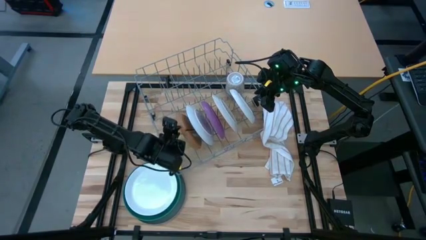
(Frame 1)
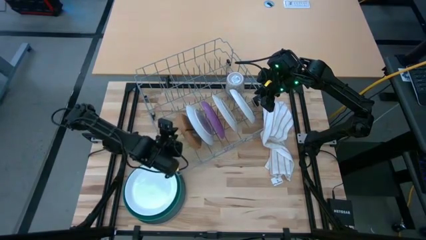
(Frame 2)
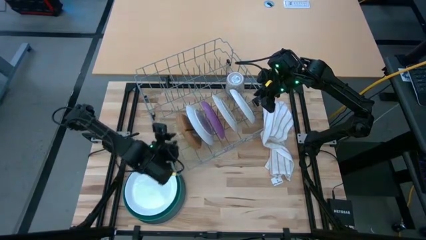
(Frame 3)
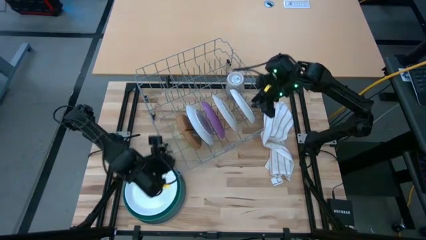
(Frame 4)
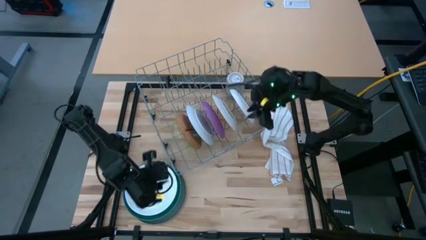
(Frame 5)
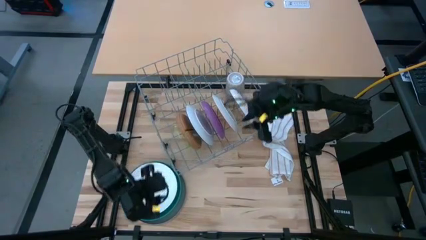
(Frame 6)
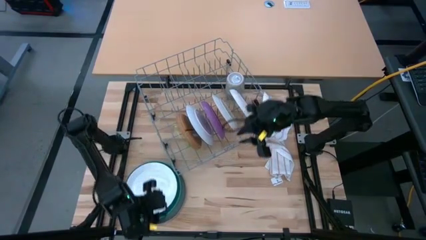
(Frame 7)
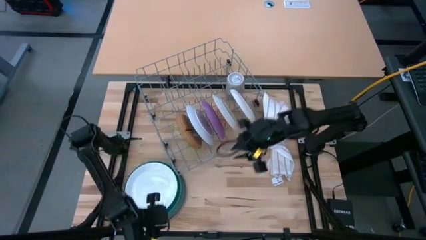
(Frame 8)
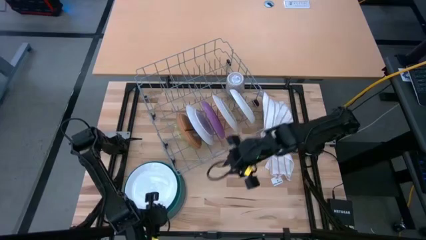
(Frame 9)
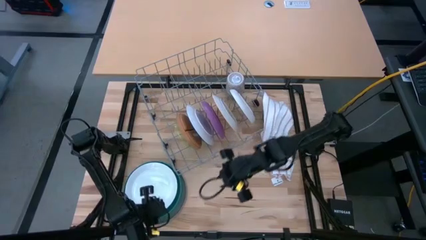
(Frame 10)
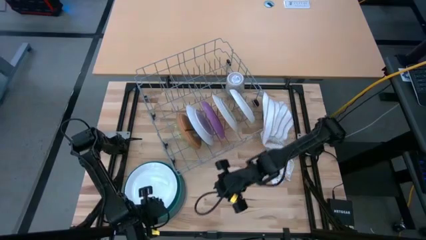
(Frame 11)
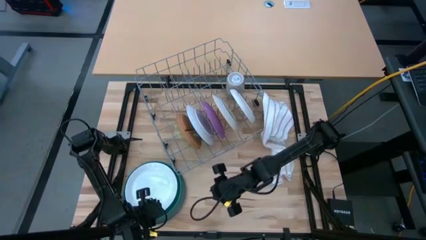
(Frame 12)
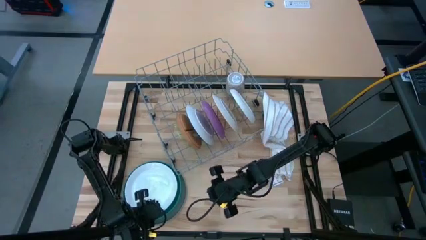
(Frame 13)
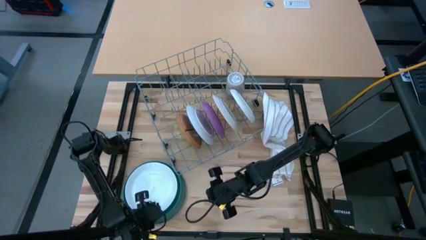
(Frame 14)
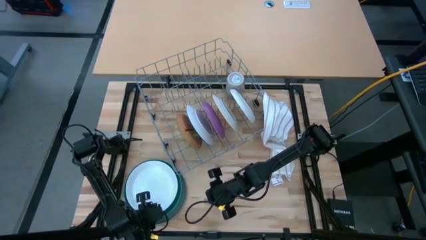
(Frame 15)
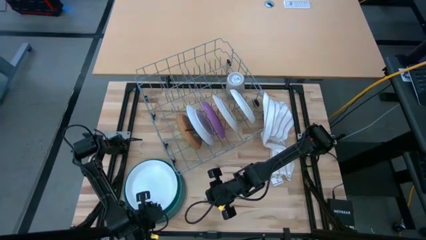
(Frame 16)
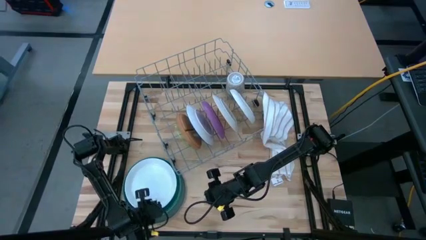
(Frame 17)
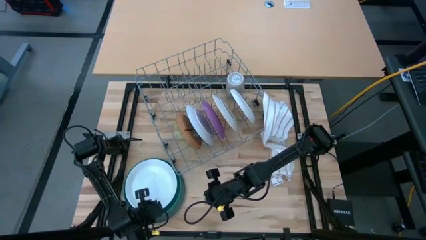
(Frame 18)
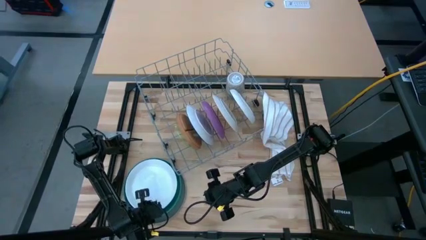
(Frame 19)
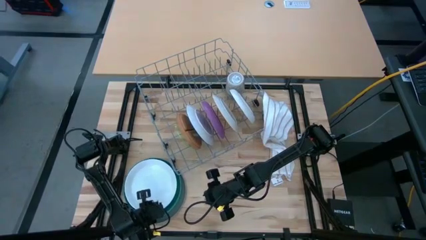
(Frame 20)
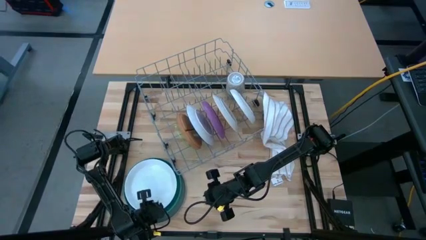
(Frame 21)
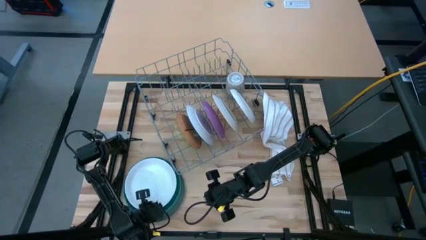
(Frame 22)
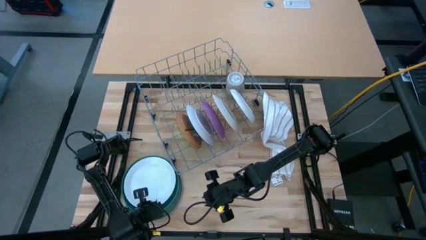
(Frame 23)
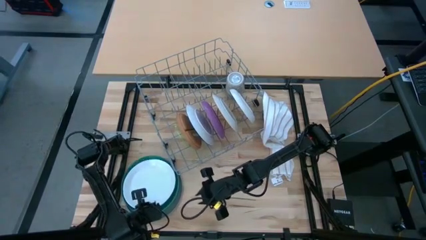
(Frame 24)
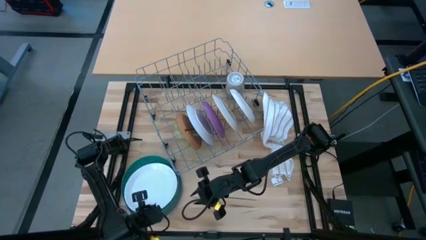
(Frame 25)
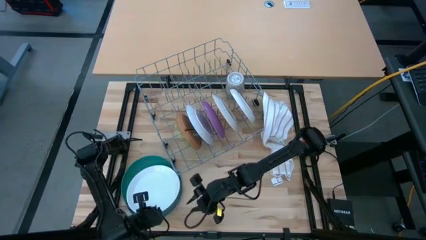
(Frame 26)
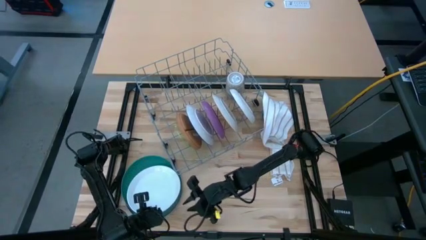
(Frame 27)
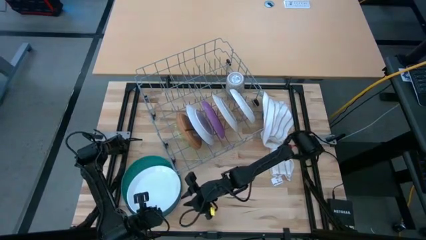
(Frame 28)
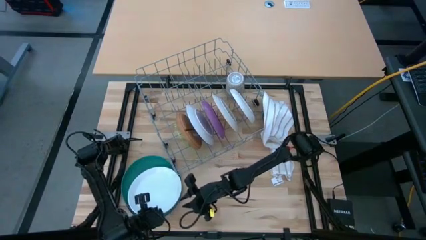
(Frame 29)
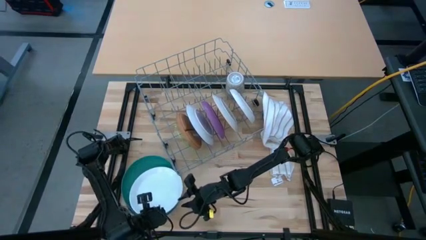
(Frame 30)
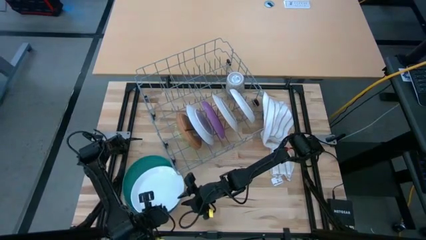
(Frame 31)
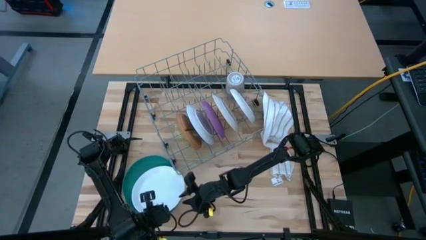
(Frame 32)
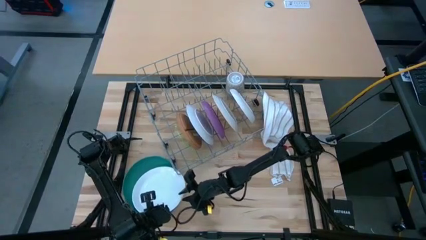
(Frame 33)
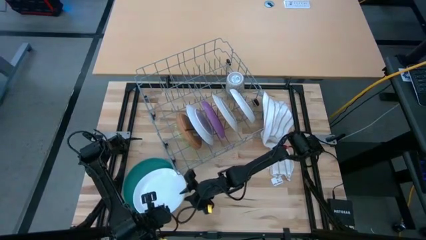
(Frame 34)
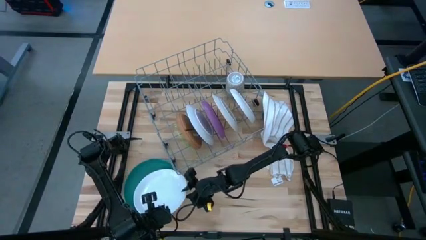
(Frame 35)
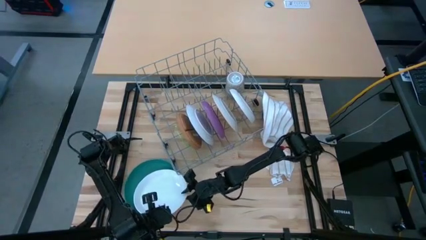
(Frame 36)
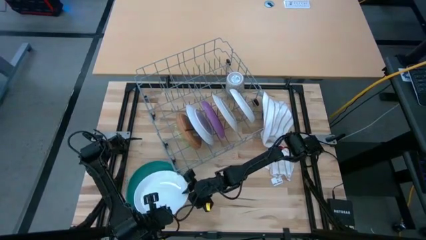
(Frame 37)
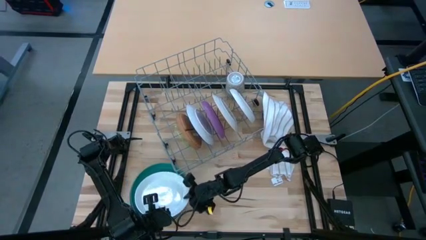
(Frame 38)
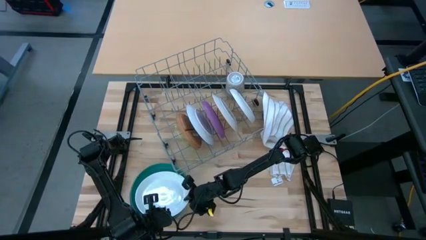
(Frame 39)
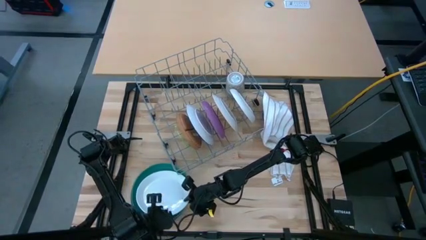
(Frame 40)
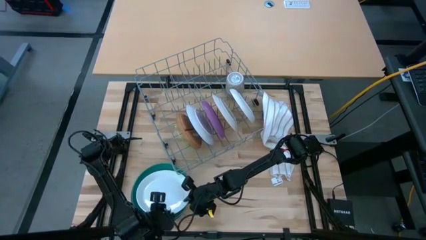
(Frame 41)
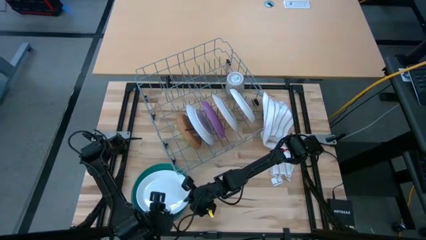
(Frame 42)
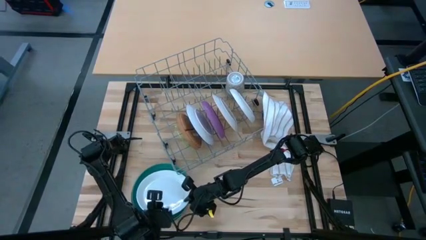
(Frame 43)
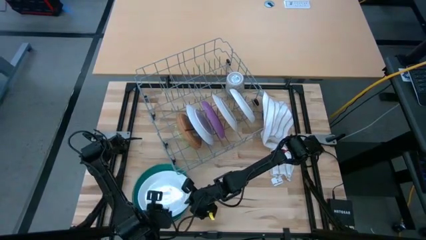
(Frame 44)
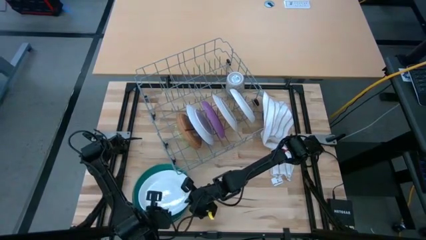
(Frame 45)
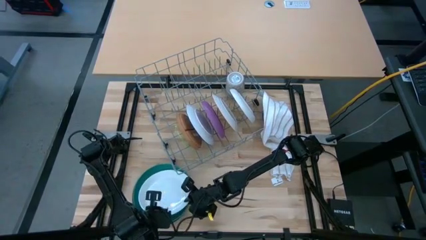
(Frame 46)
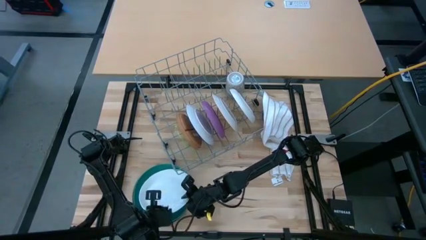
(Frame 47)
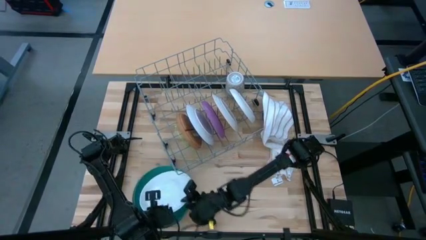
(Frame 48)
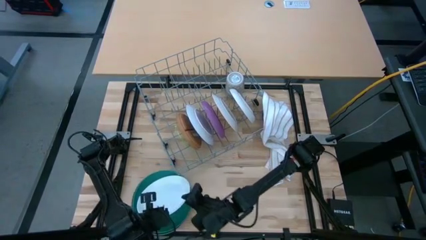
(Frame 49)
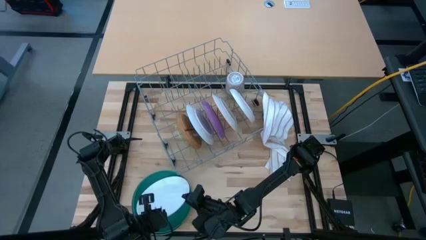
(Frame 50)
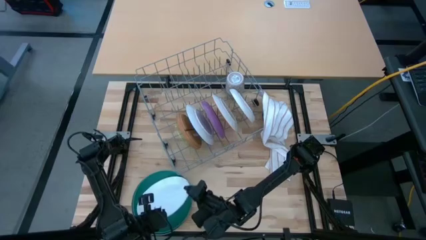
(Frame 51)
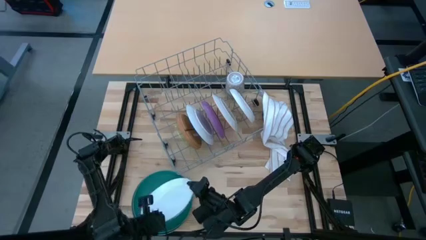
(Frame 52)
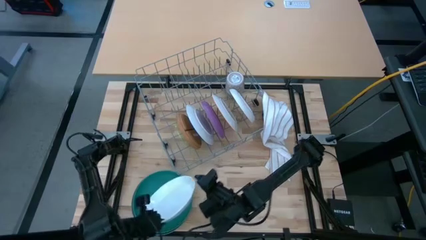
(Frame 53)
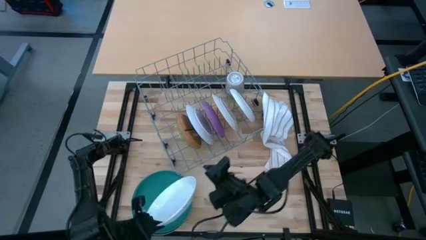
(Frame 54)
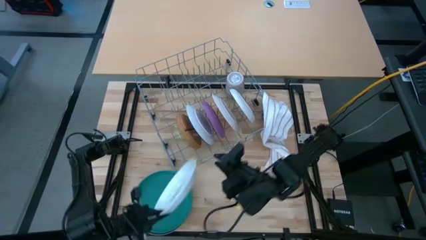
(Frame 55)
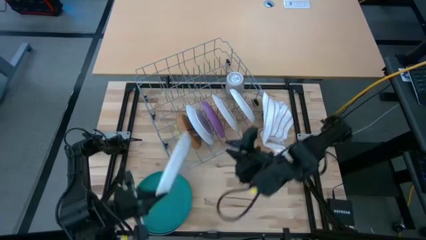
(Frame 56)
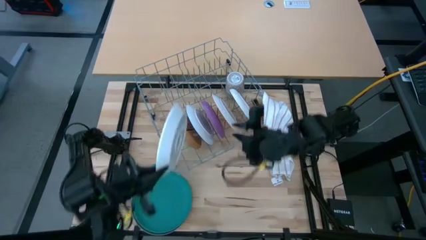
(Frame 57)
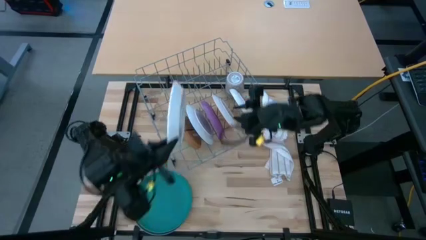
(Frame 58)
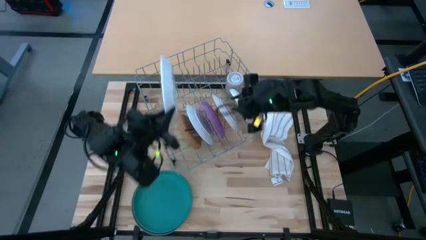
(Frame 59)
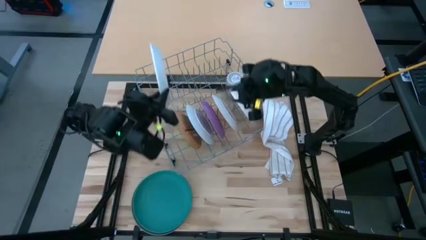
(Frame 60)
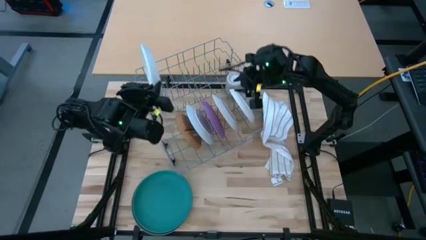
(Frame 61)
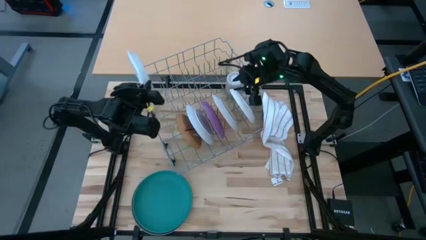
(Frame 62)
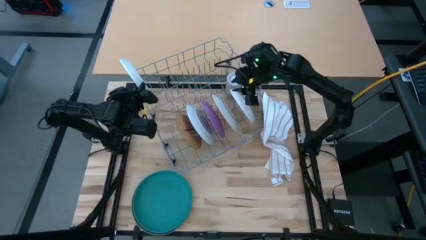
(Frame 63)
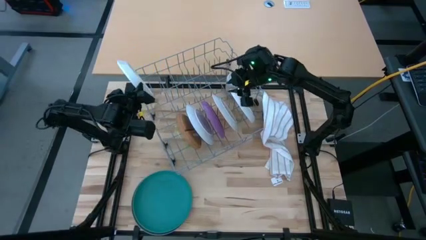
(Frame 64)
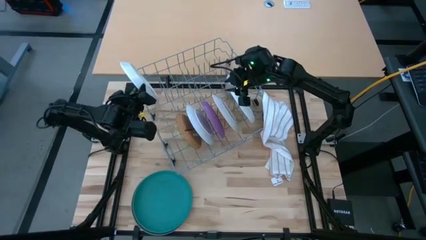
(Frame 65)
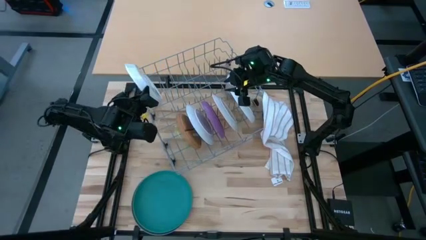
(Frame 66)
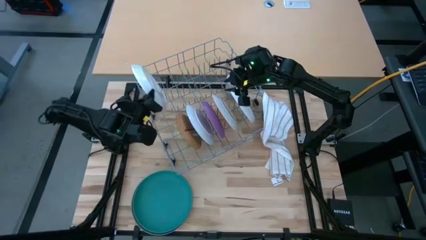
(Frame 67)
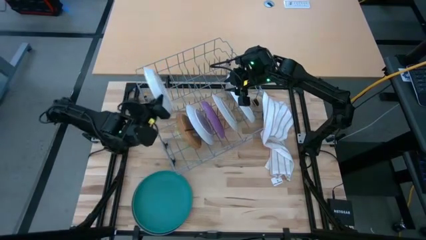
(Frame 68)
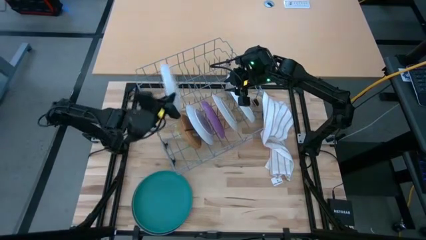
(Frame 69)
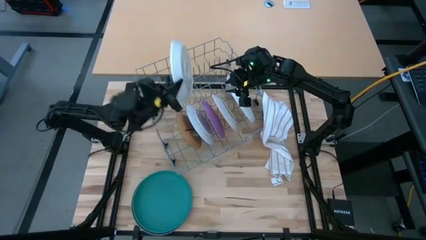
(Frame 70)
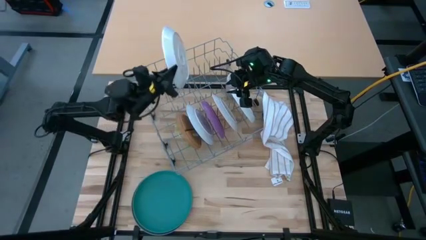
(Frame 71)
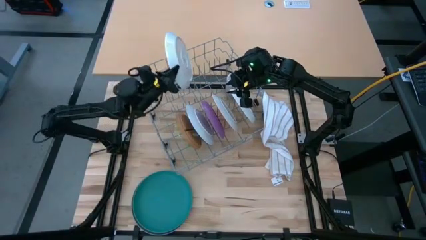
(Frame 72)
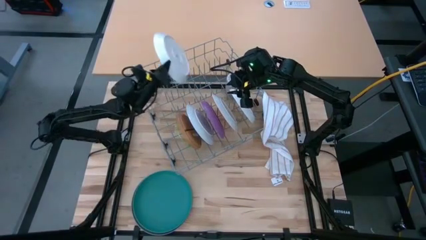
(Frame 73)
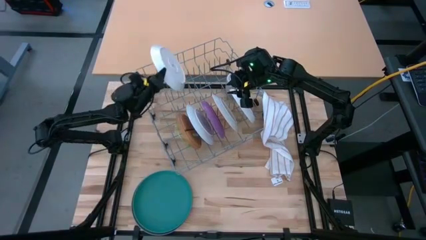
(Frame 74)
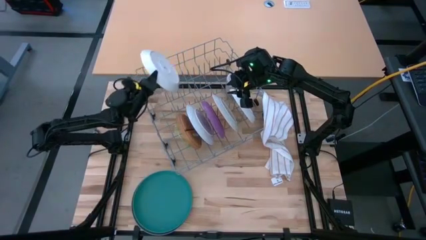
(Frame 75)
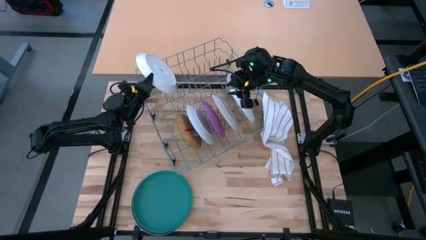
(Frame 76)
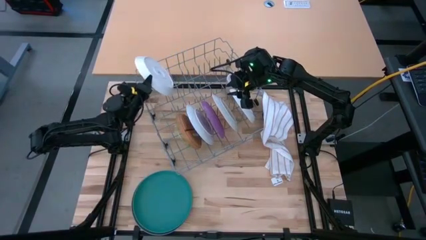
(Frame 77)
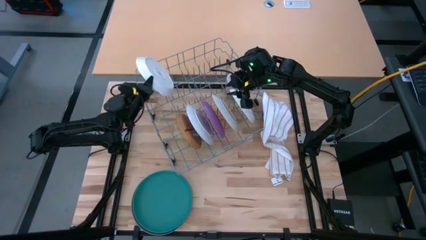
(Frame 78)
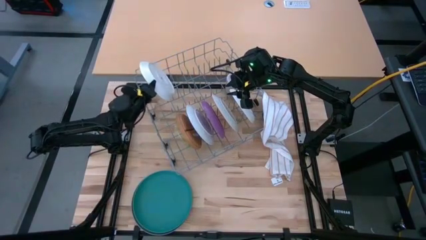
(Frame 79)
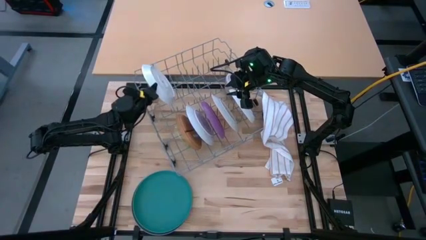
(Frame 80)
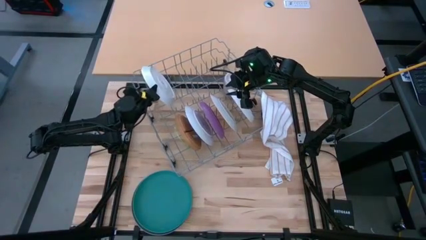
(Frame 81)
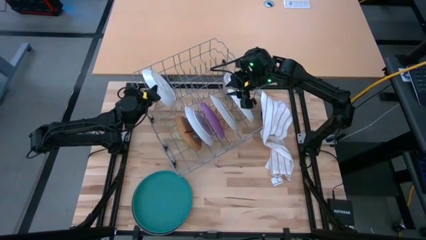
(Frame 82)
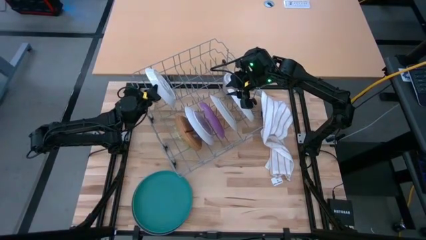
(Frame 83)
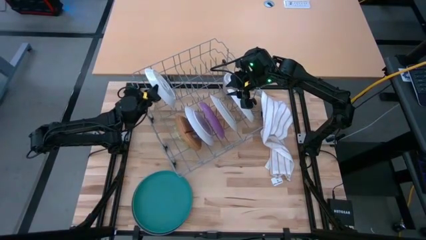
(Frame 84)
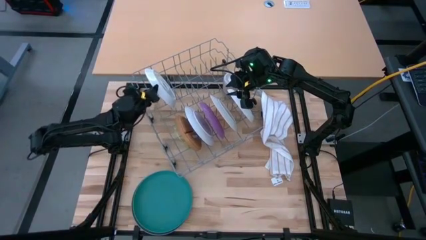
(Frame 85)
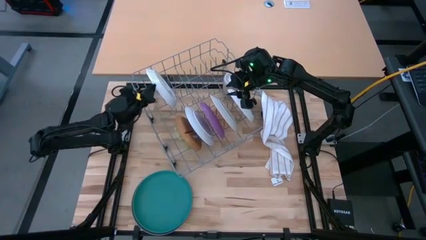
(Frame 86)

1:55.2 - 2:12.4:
Task: Sort dishes
Put the white plate into the dish rack
